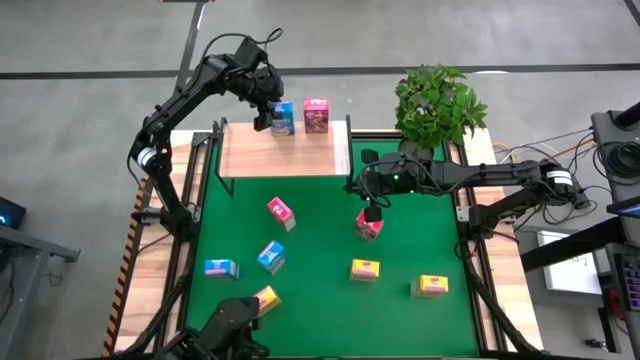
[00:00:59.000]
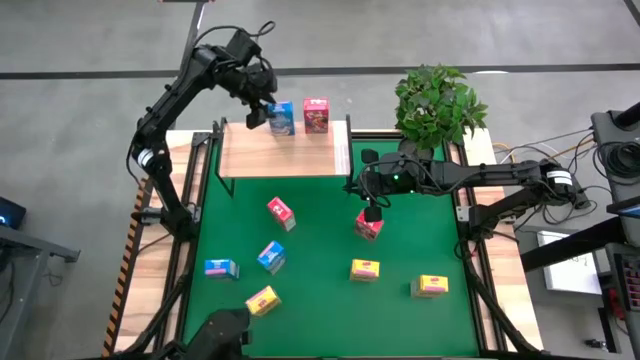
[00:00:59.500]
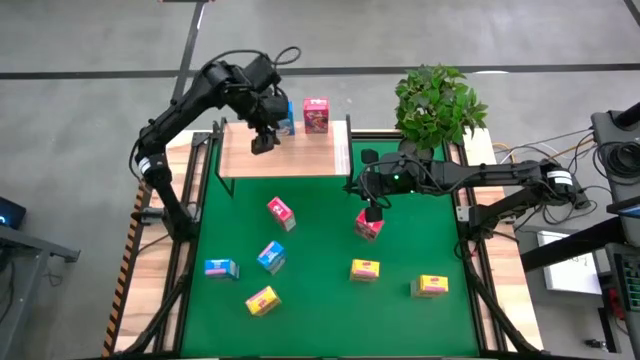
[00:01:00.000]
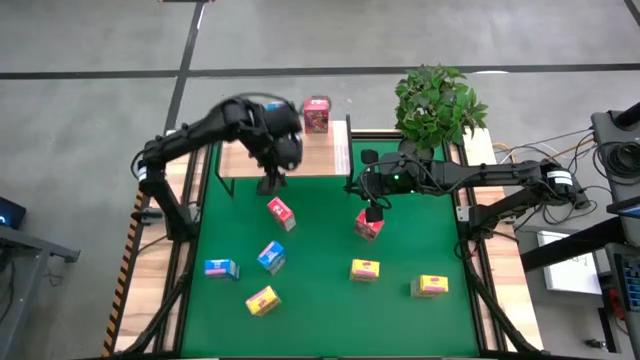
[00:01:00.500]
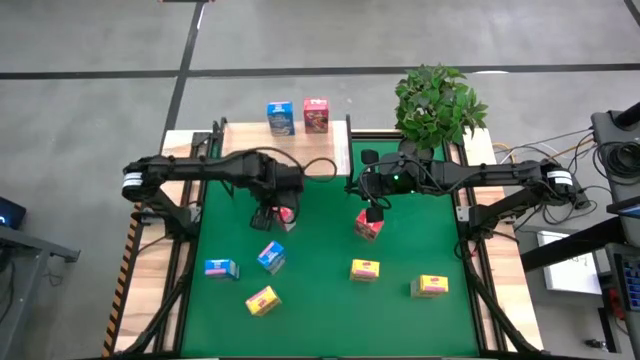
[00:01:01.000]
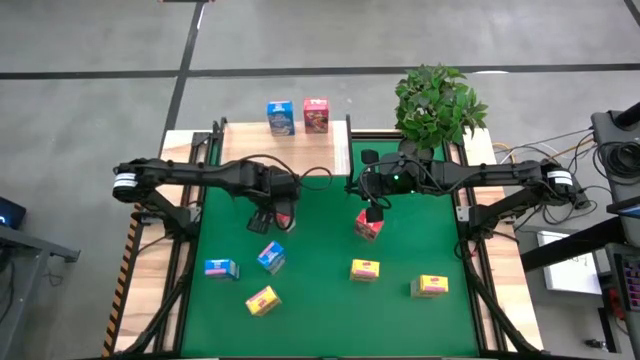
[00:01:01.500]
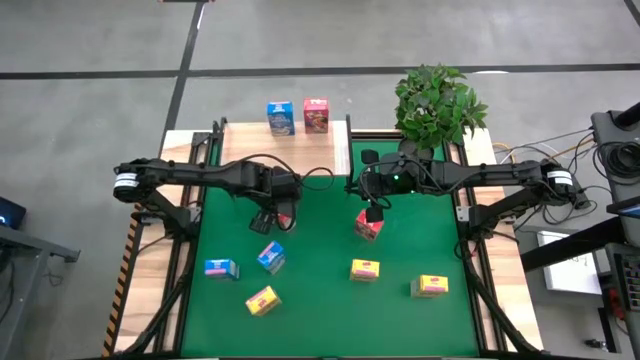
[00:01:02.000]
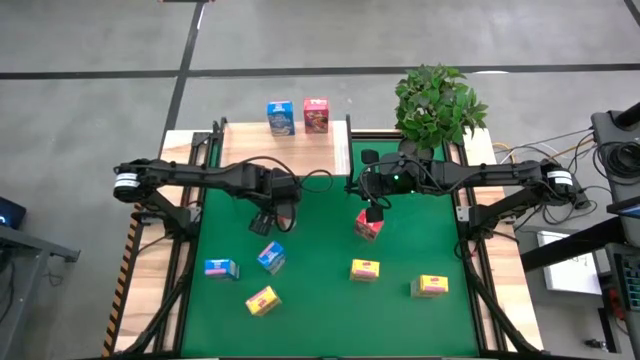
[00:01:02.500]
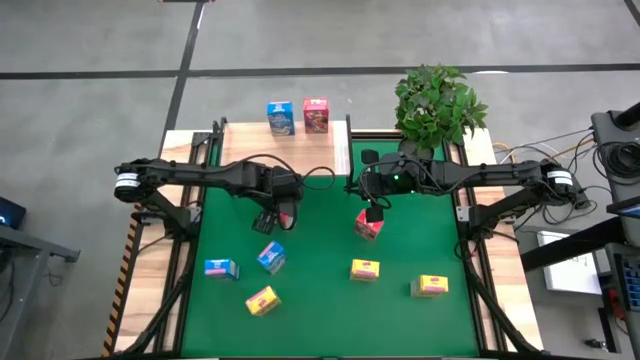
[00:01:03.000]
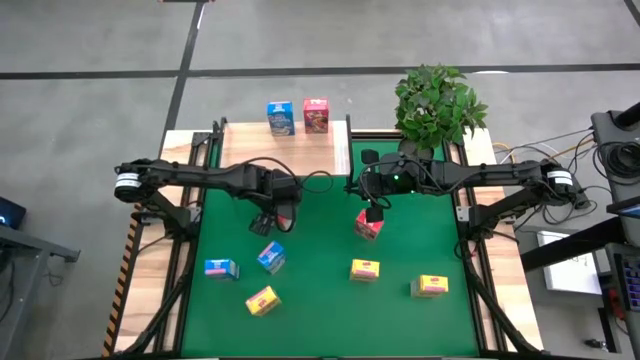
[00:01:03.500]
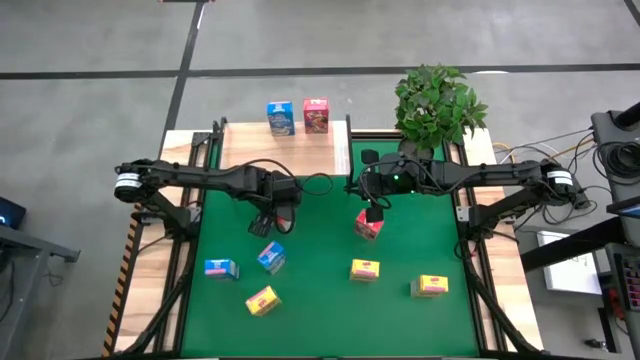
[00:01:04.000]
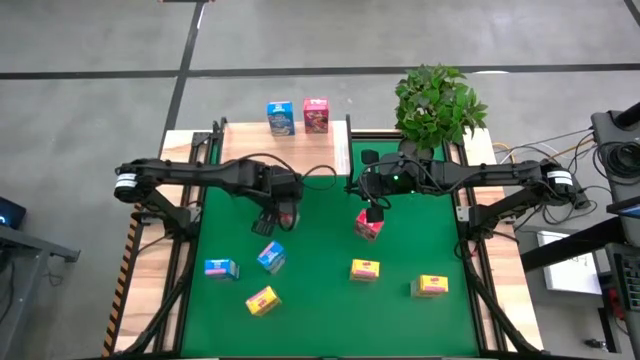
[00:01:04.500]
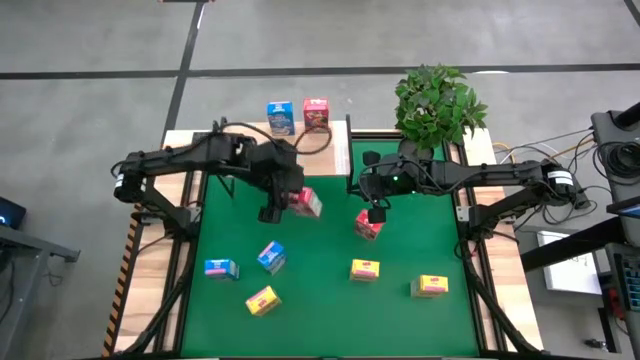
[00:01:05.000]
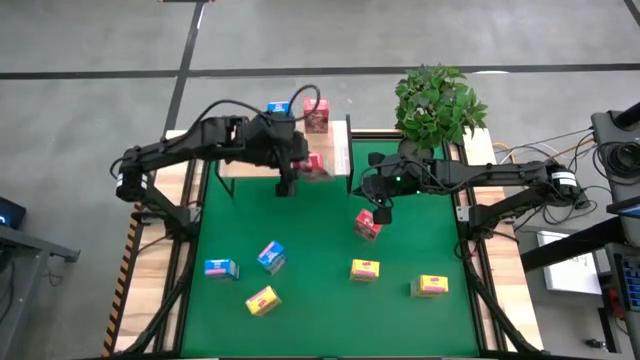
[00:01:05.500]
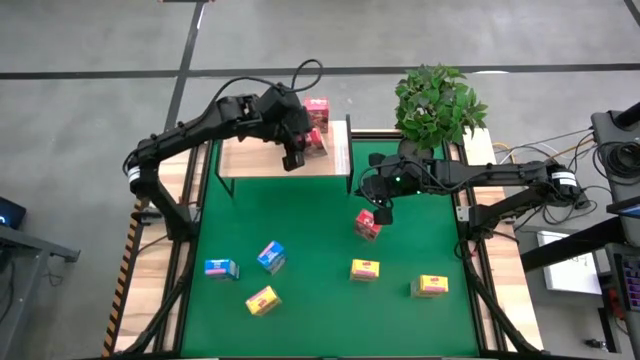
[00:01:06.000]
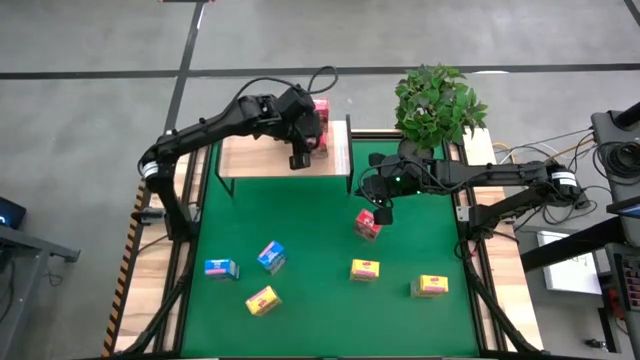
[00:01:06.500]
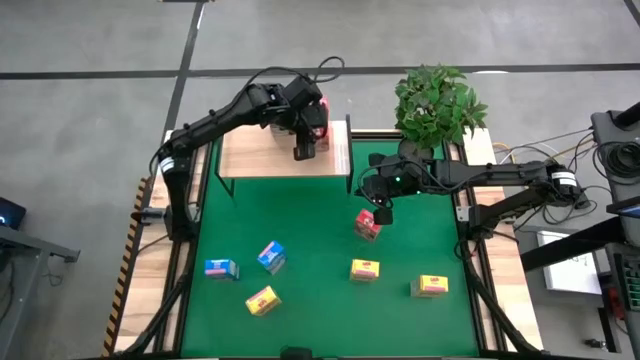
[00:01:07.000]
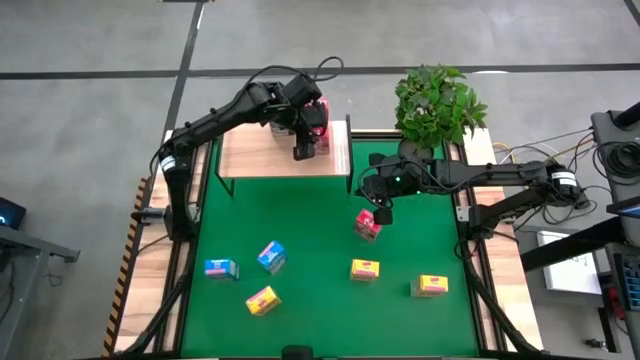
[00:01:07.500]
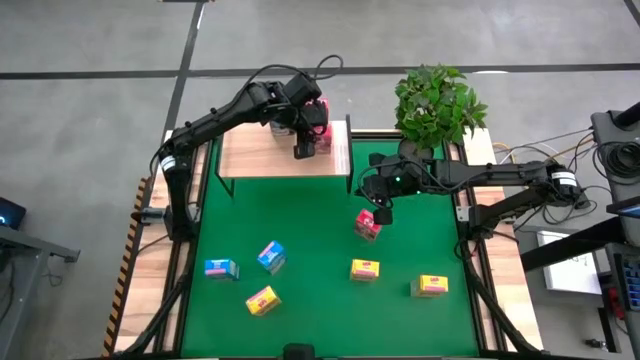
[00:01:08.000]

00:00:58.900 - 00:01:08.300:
Task: Stack cereal on shelf
Put the left red cereal on the shelf

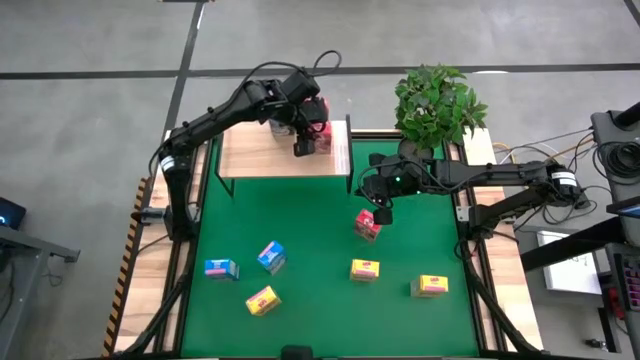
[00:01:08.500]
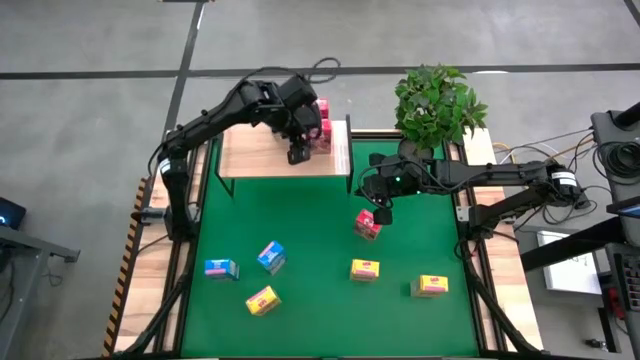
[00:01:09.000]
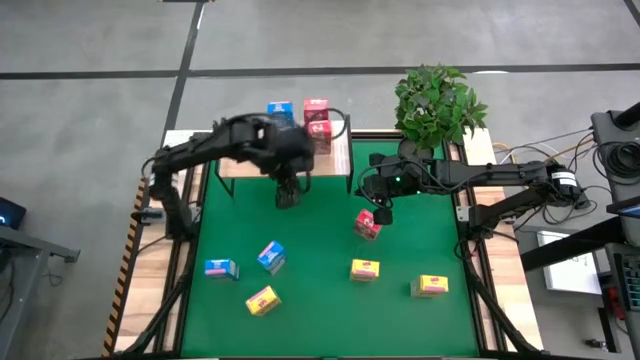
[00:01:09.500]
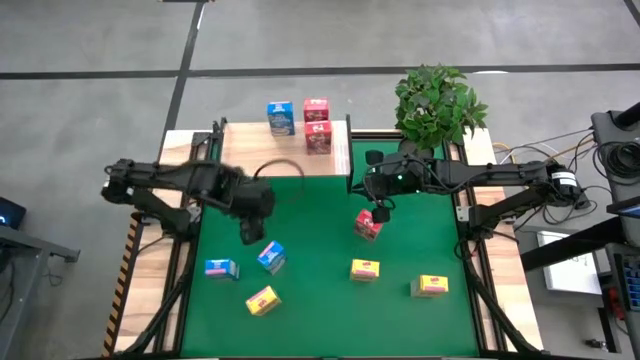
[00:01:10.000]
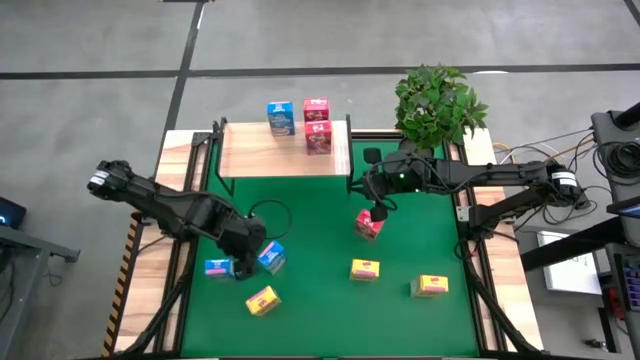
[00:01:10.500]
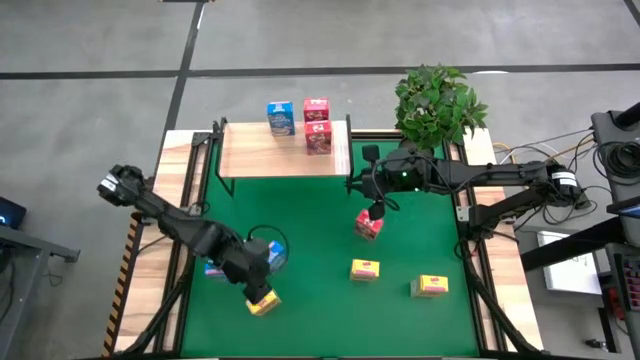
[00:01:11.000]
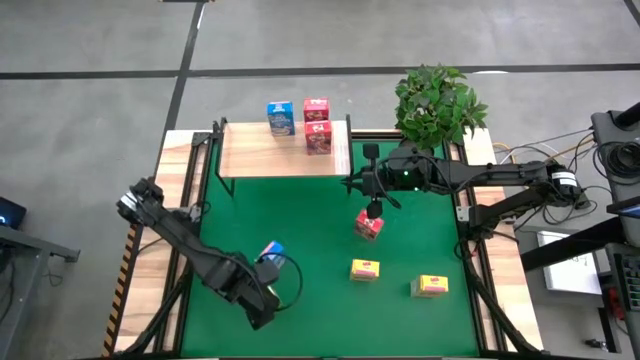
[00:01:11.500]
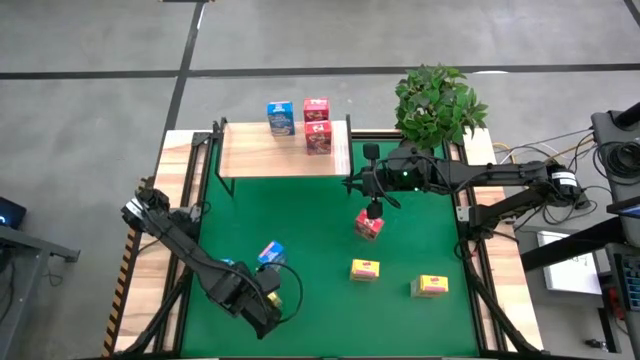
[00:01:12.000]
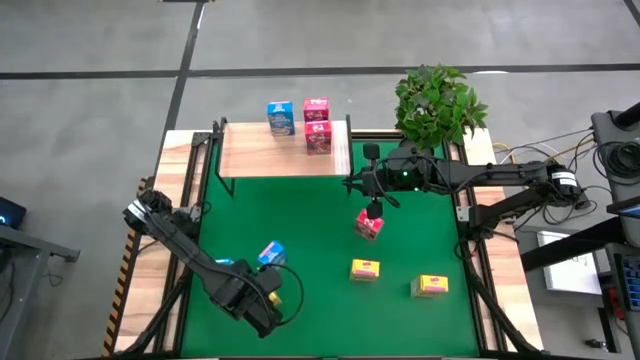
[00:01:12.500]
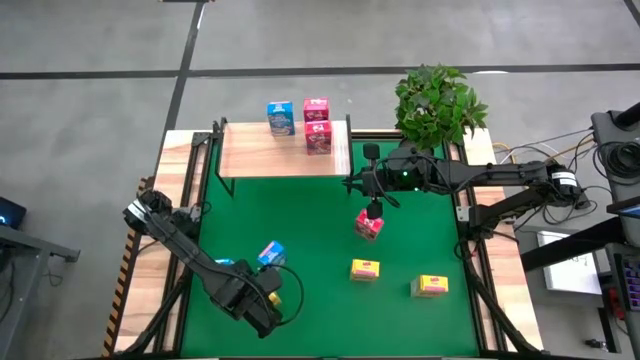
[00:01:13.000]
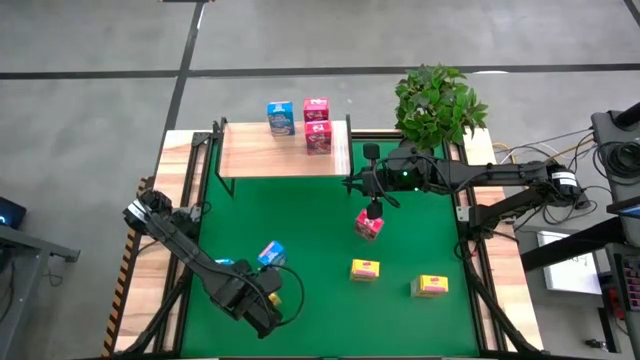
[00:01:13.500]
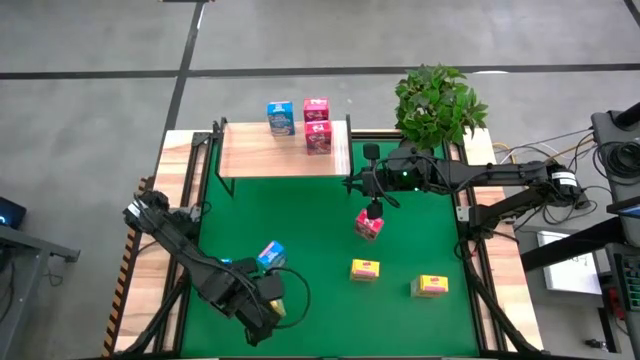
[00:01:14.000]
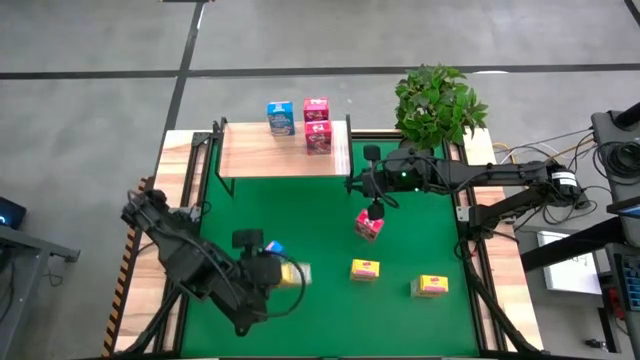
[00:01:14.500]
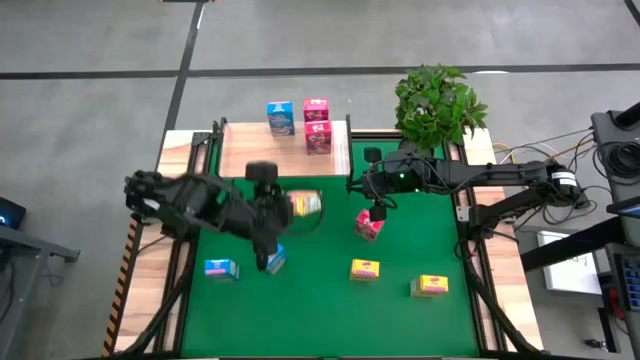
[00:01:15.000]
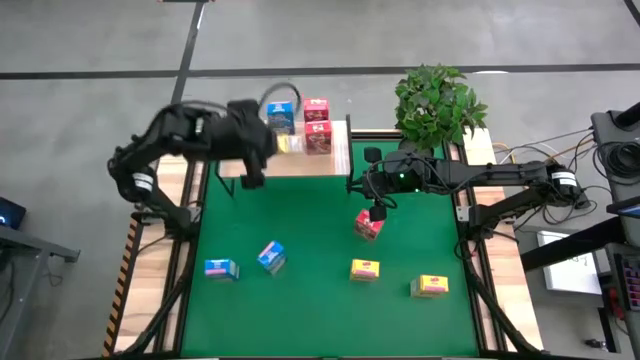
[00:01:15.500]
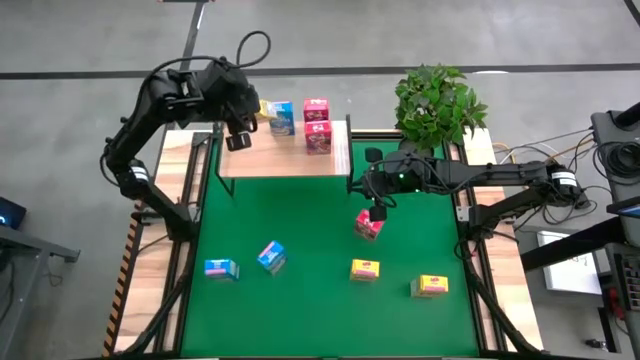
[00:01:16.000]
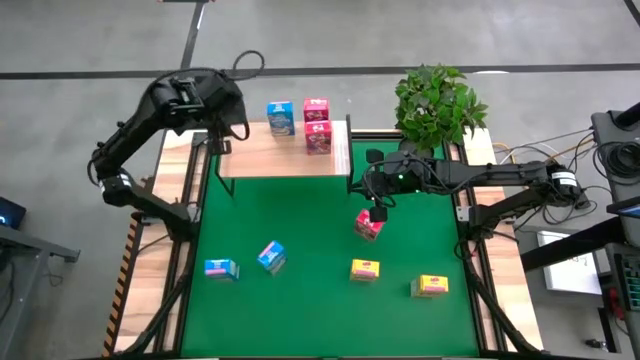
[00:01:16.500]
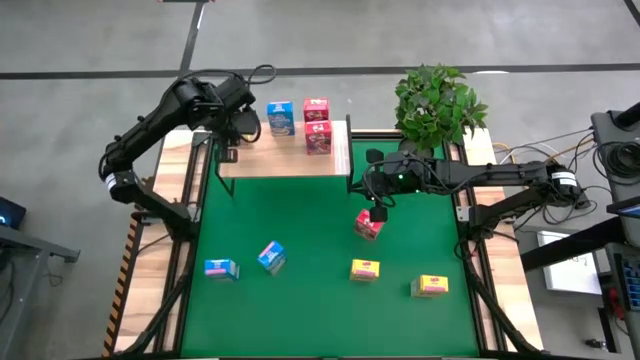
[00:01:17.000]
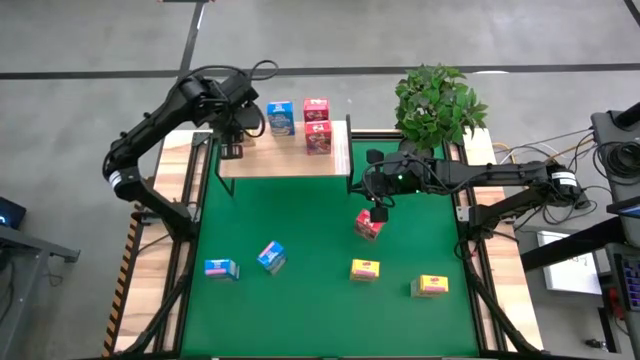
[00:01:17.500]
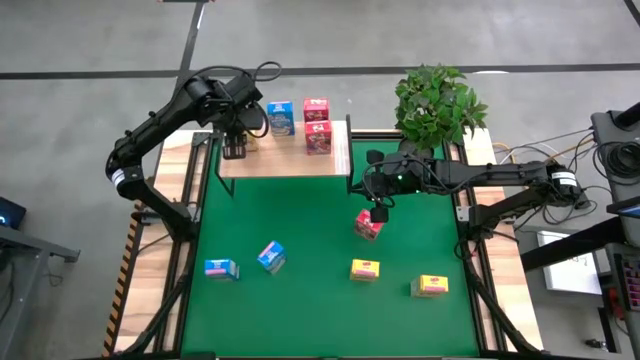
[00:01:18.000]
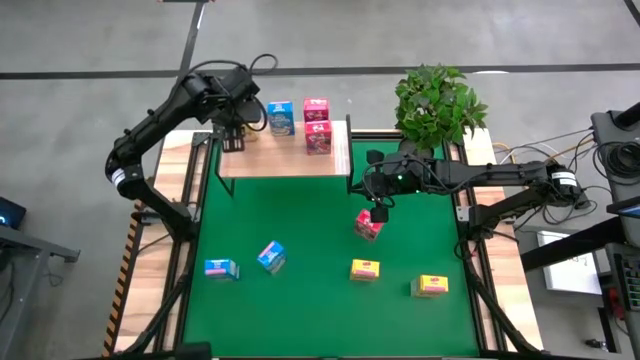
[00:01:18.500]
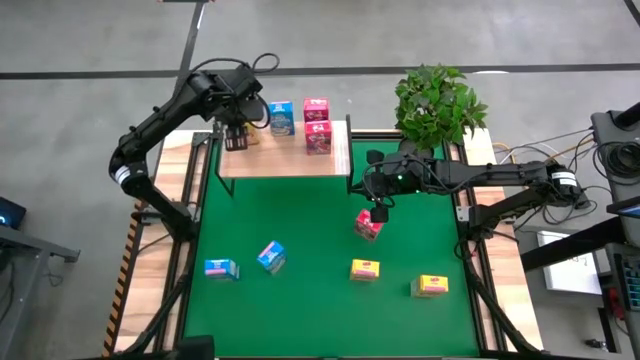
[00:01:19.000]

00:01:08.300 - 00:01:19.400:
Put the left yellow cereal on the shelf
